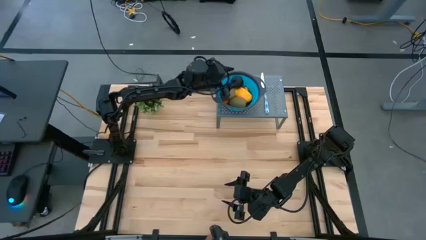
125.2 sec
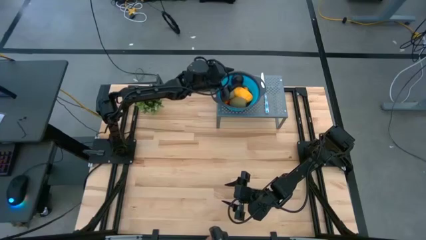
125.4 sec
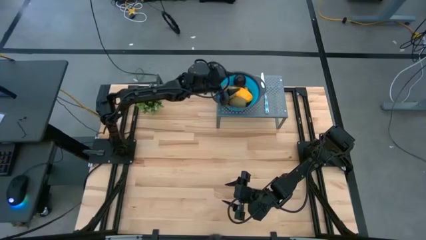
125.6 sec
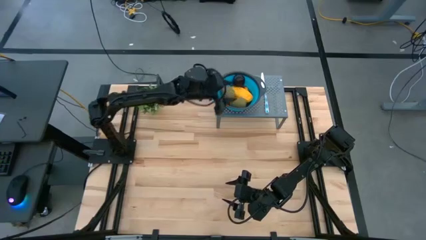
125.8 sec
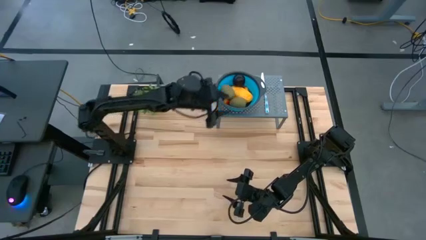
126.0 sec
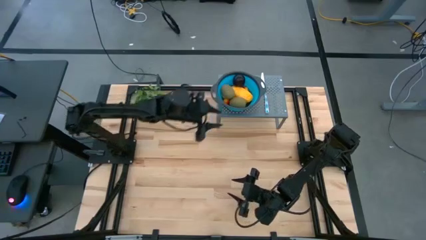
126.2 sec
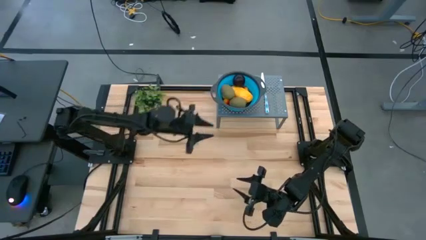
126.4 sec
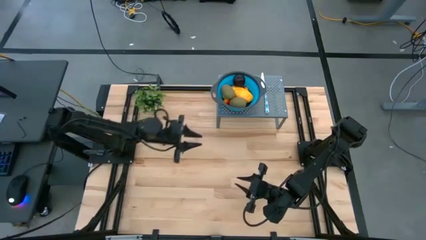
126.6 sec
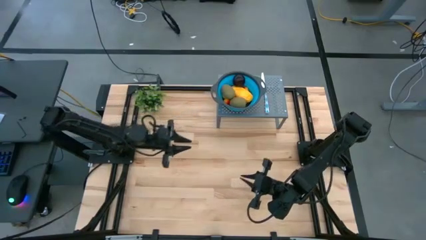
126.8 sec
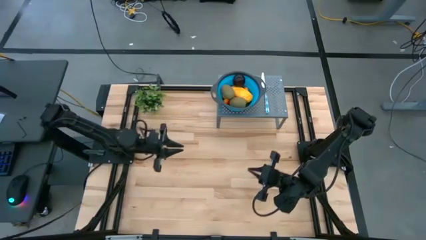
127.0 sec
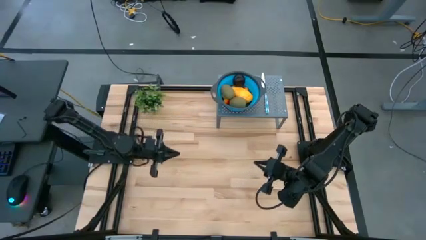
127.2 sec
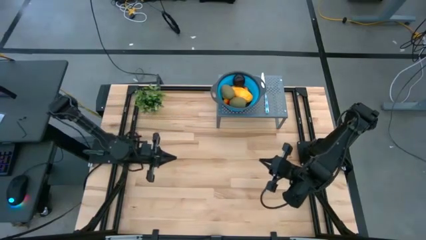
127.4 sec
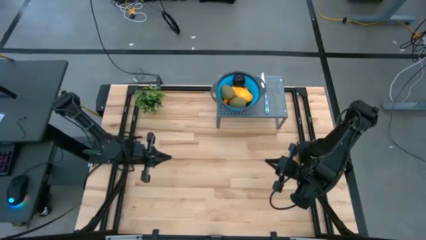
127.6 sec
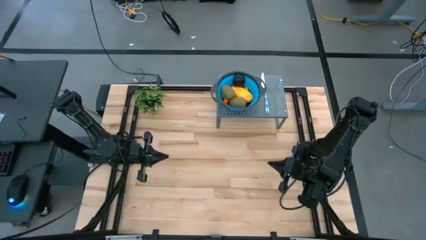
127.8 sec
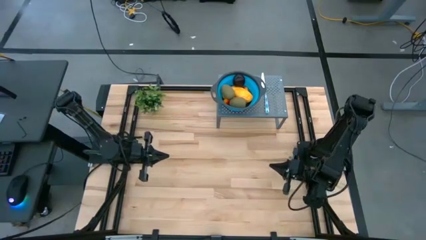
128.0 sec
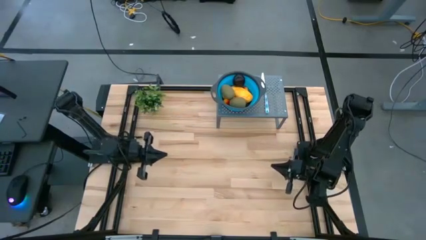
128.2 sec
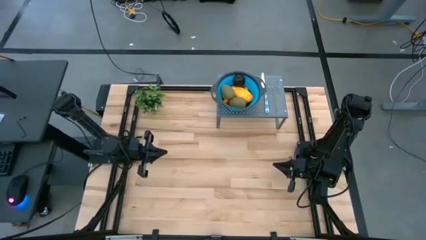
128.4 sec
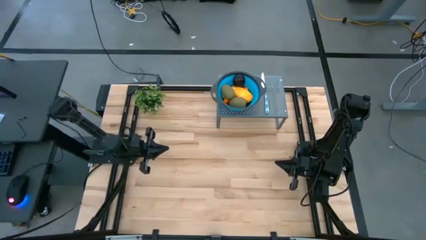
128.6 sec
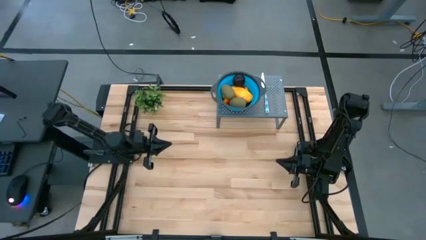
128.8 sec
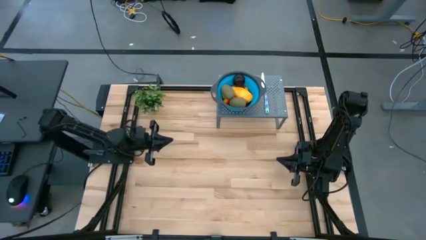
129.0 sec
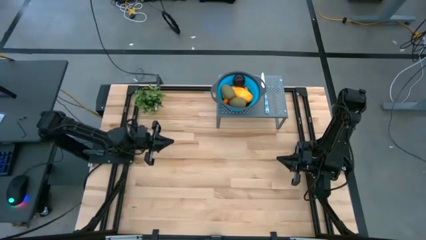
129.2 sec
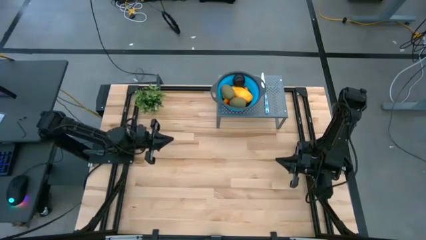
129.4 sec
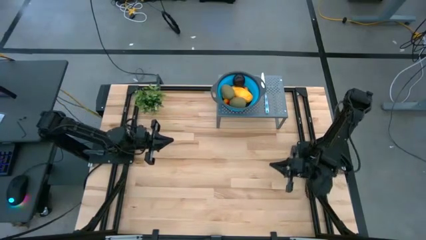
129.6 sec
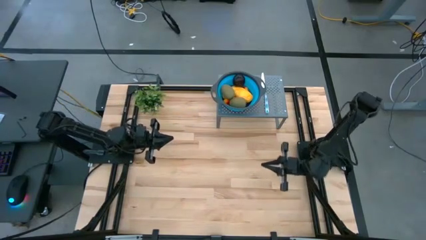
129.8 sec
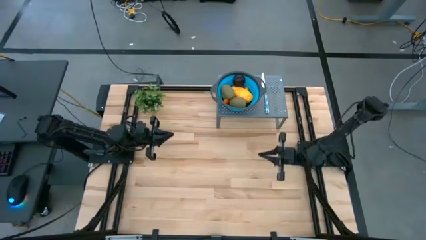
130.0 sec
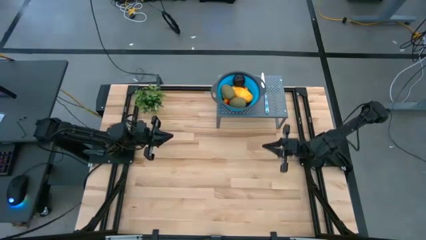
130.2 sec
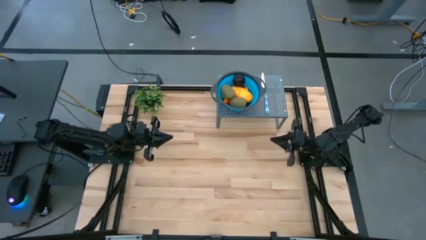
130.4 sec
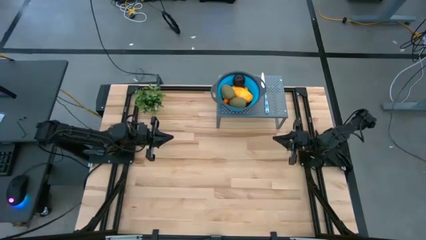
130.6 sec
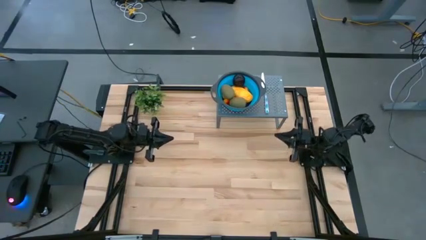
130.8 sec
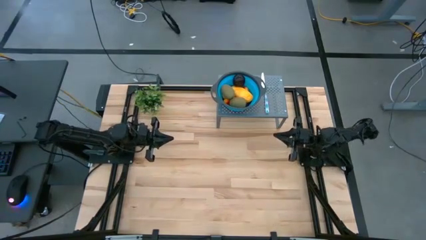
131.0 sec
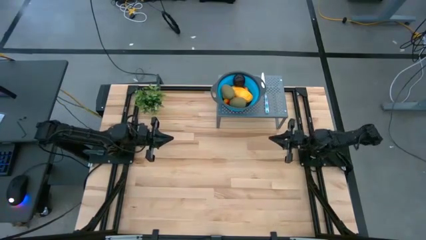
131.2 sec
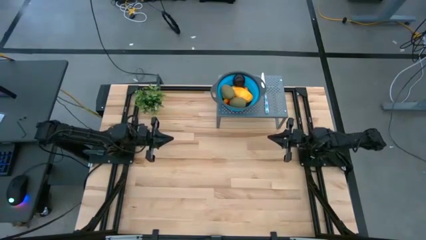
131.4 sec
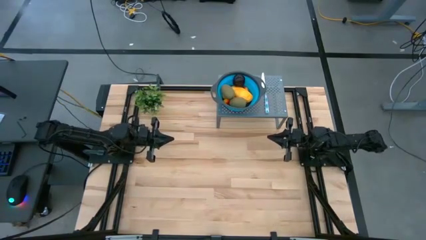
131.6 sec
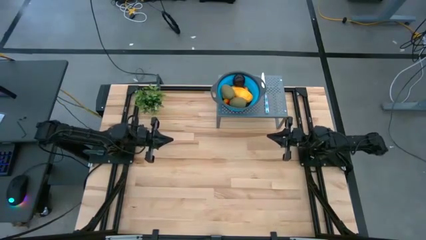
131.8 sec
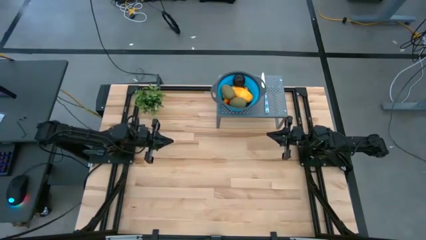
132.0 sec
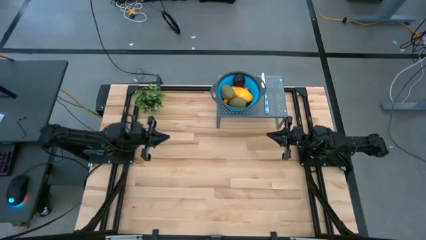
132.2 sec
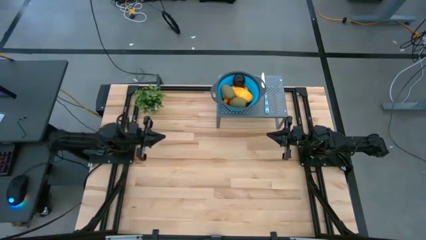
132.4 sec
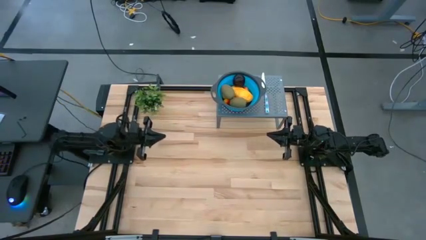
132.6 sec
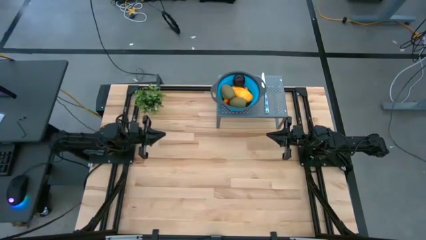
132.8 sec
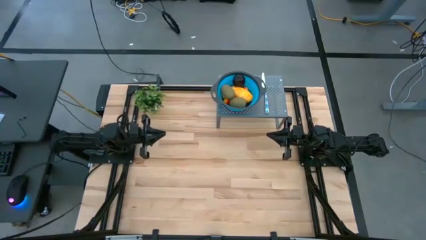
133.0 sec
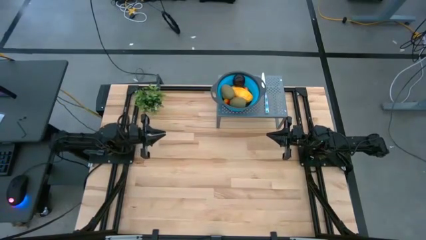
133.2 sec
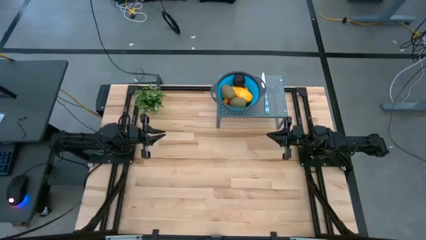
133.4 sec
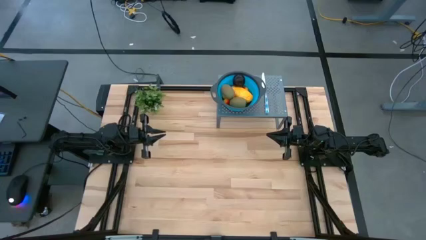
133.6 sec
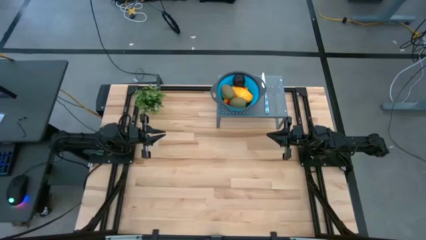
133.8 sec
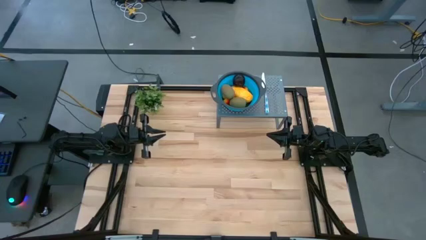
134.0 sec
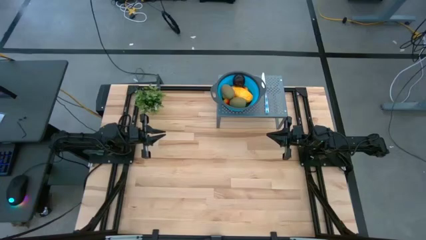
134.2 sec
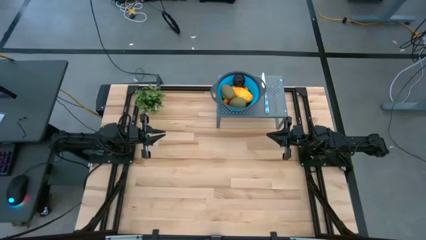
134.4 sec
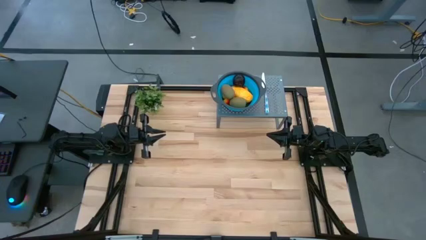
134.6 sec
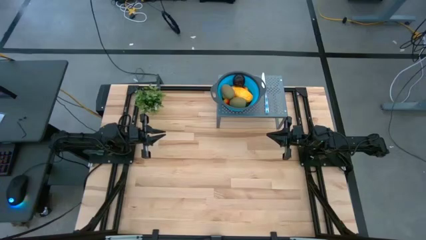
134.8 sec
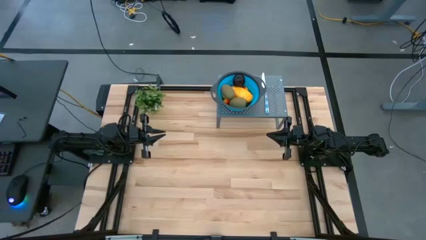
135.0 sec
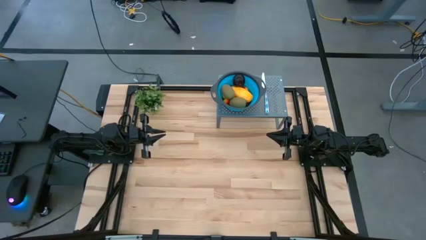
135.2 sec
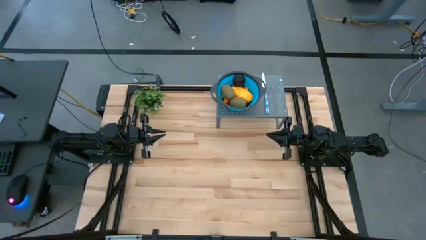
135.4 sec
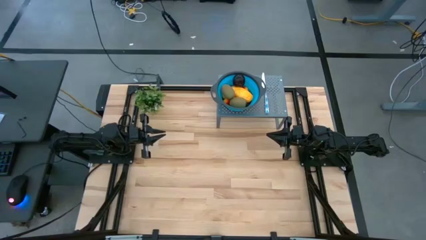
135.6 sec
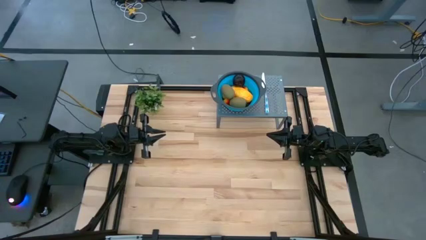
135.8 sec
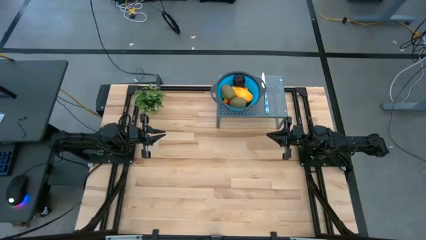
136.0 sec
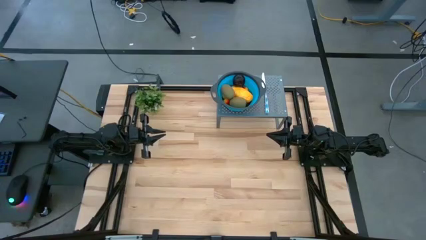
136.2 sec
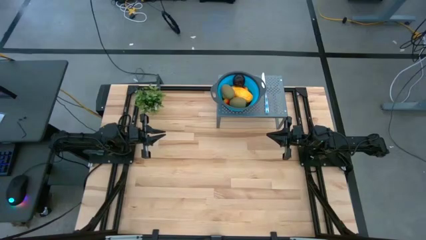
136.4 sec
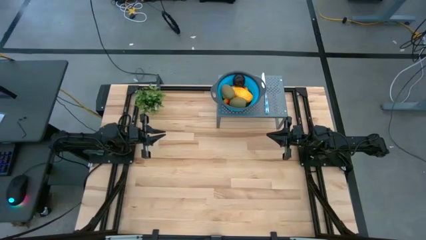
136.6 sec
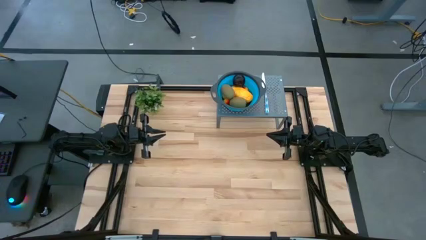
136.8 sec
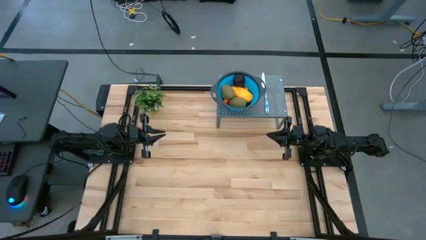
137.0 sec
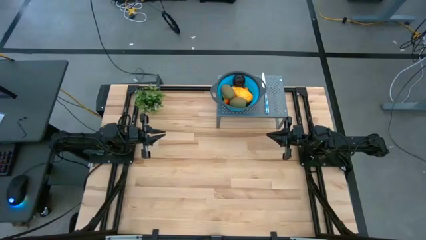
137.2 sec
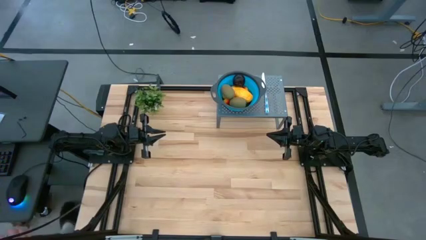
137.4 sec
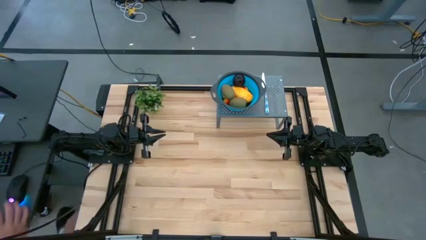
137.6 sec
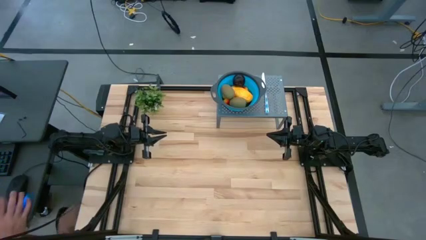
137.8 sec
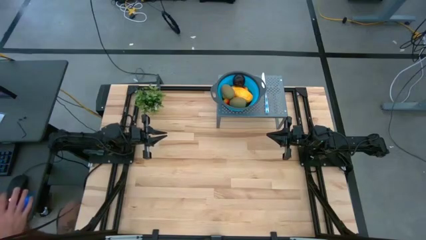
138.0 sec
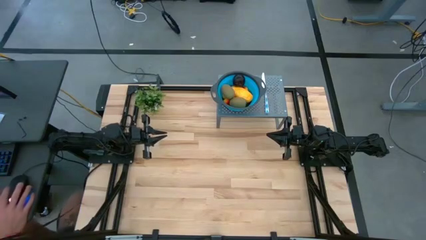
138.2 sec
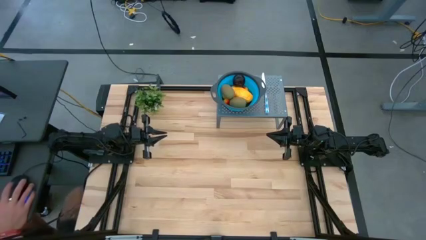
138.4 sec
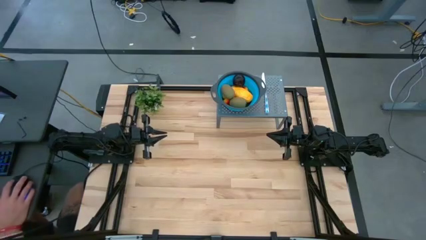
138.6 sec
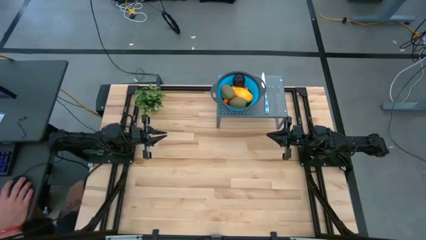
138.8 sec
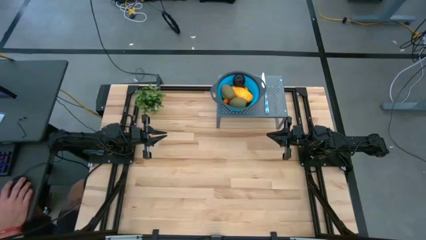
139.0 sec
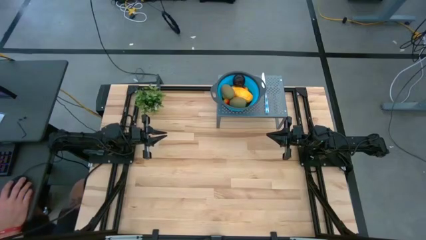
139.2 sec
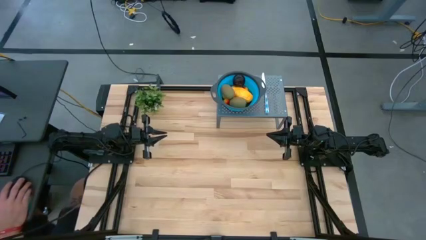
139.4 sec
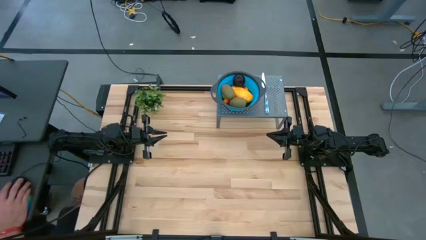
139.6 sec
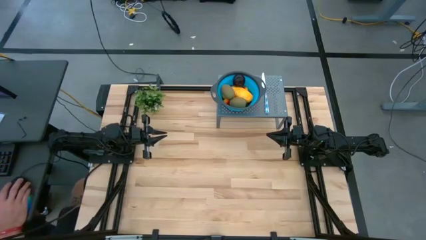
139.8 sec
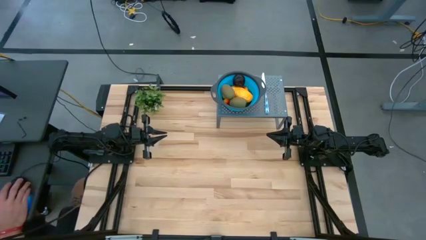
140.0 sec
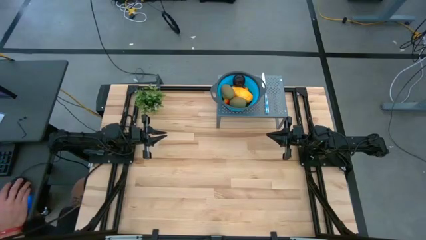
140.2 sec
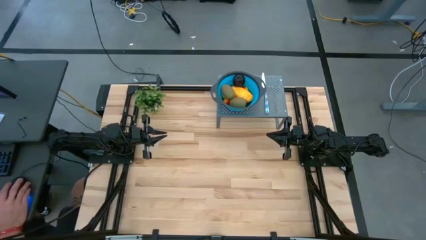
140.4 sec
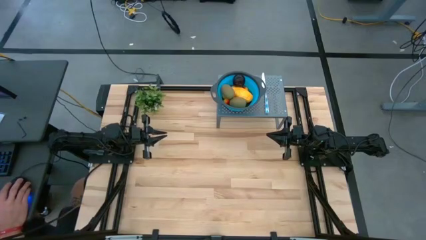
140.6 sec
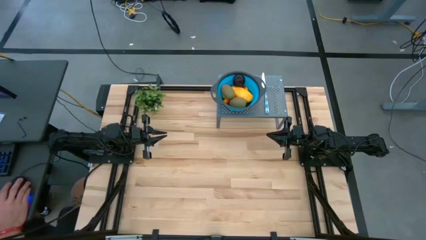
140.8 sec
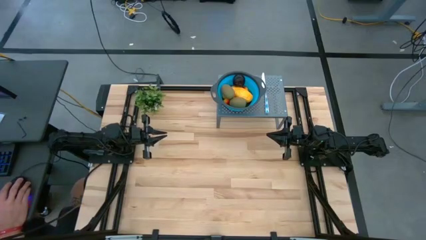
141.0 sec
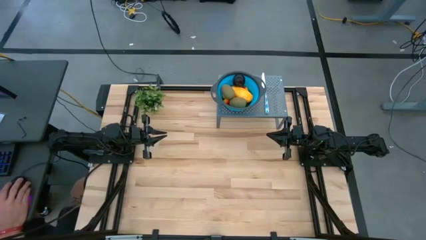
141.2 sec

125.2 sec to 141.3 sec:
Task: Pick & Place Fruit
Return to Home Position
